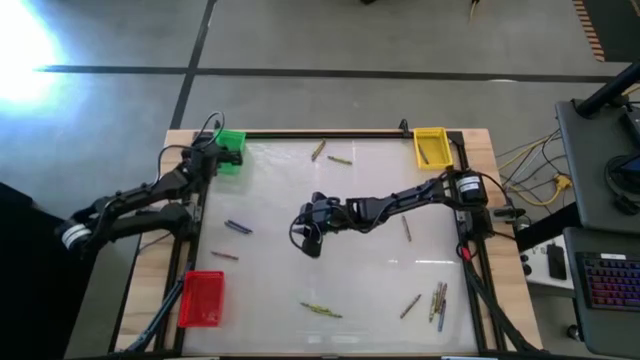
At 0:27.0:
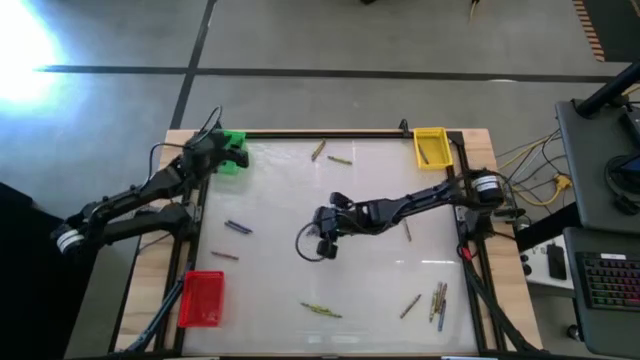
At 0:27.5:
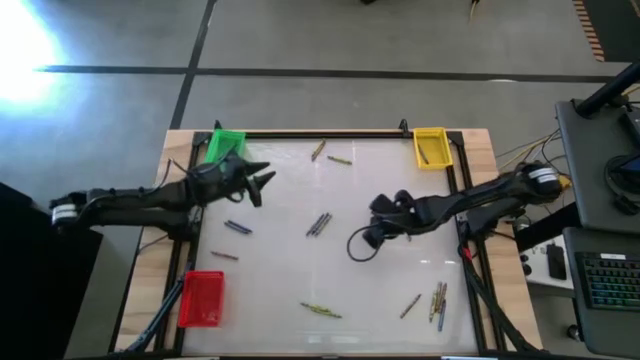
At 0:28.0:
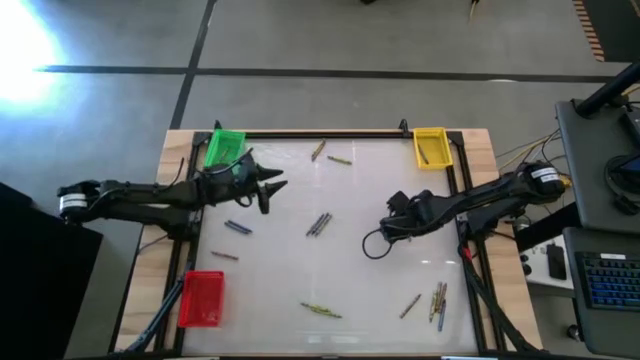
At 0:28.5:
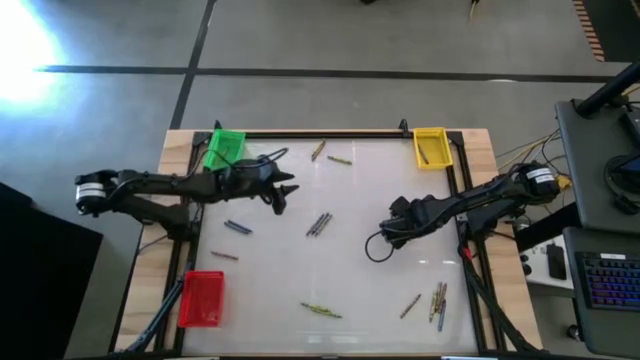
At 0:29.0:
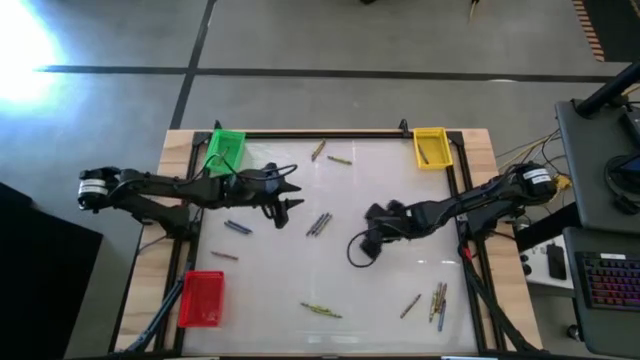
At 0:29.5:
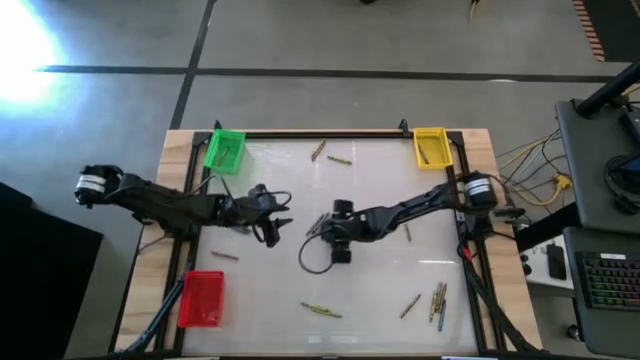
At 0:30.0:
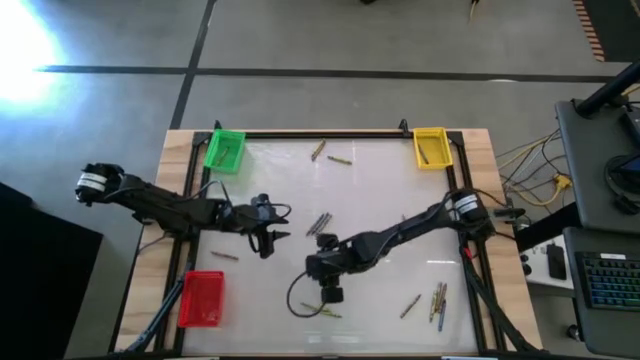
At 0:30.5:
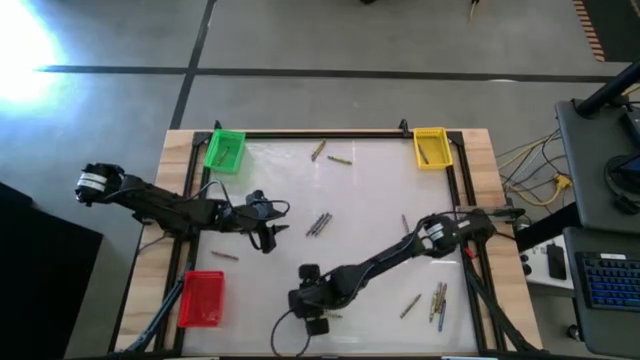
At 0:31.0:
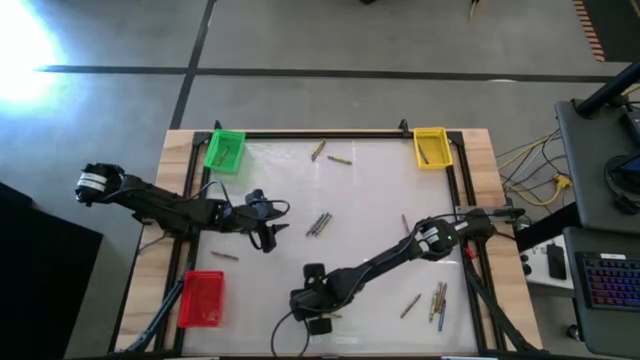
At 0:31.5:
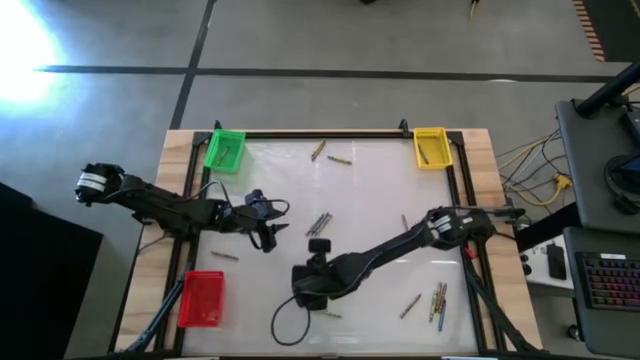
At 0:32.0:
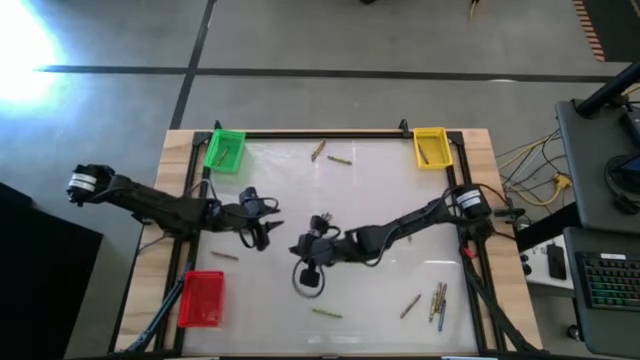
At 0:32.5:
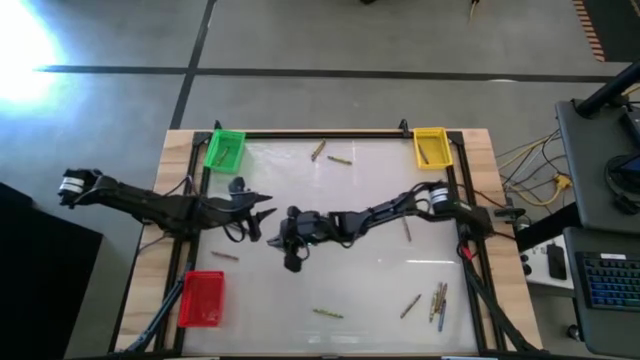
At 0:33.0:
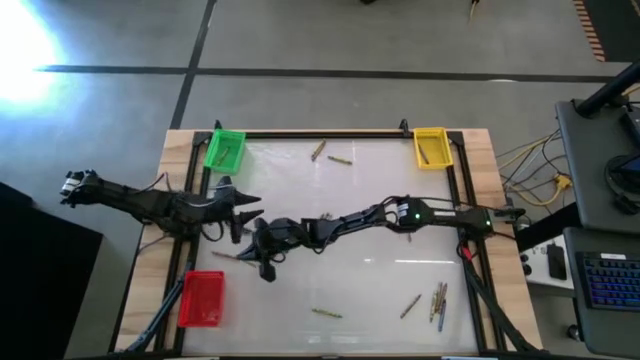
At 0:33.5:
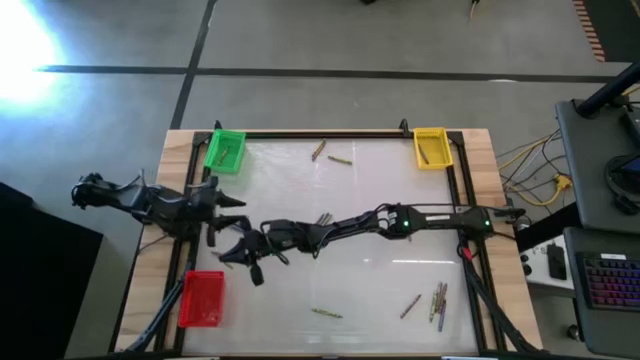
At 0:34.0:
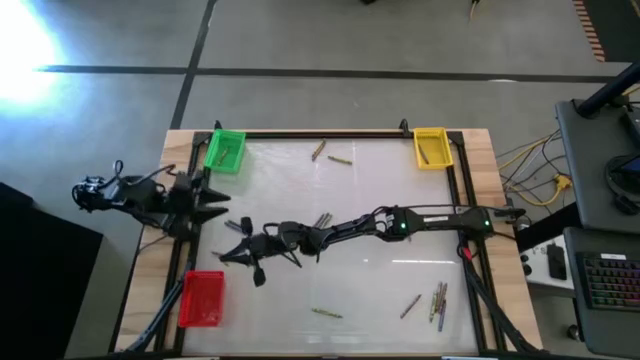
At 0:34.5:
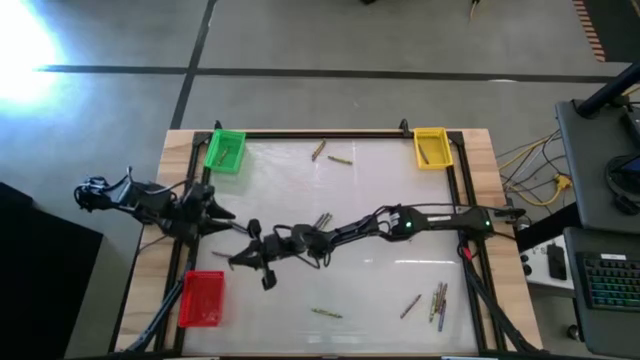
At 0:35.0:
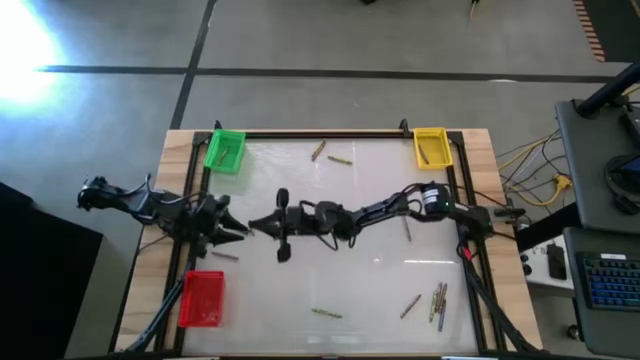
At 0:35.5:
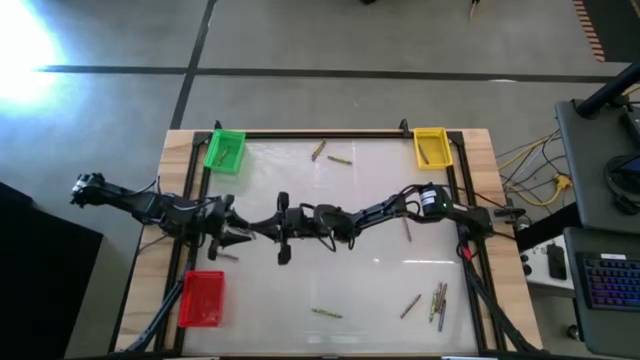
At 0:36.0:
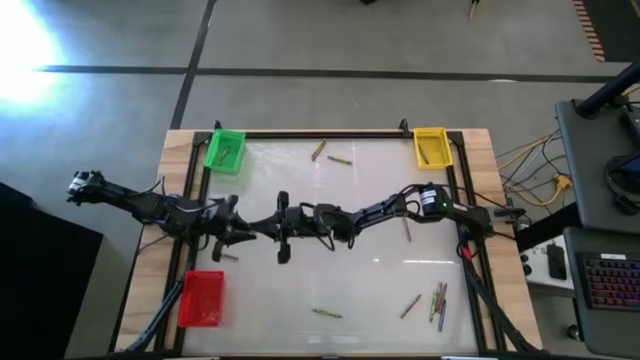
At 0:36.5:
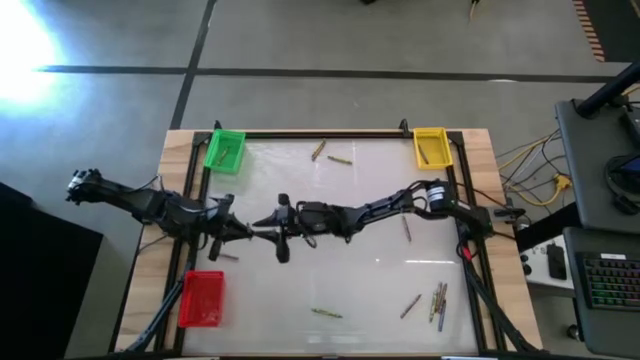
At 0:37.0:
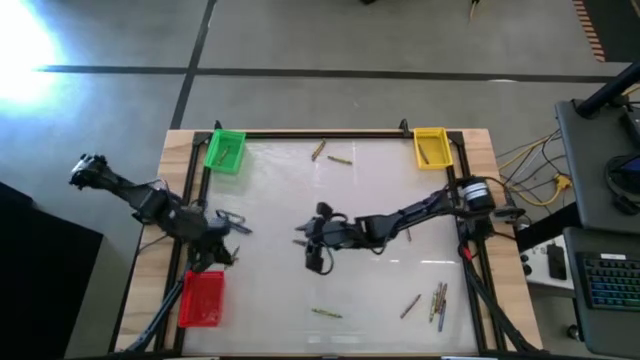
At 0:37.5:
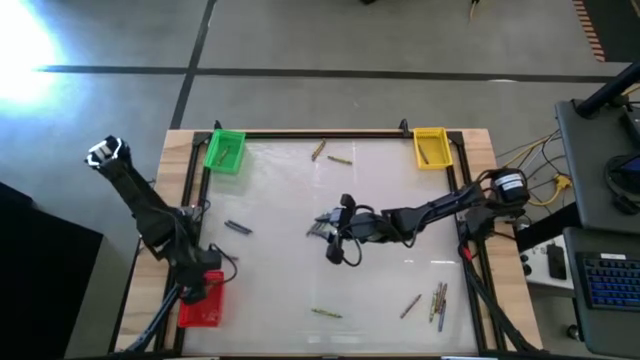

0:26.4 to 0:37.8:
Task: Sort crayons
Put the green crayon into the red basket

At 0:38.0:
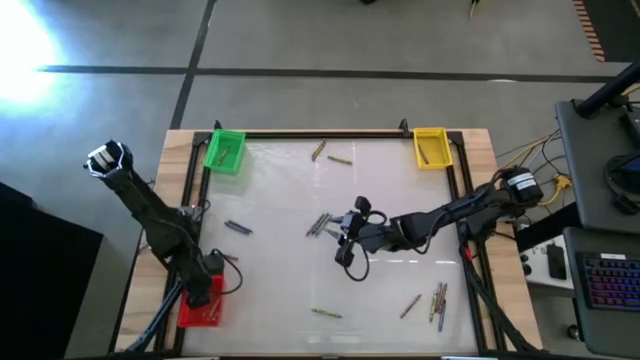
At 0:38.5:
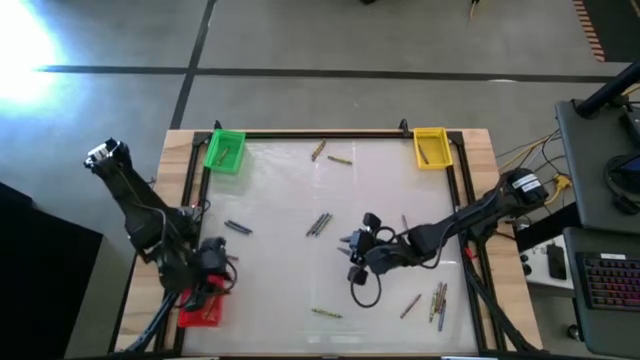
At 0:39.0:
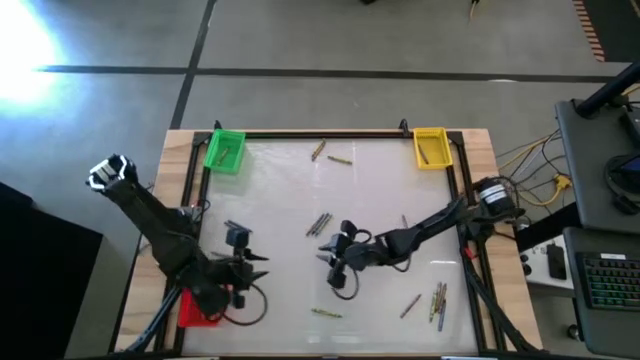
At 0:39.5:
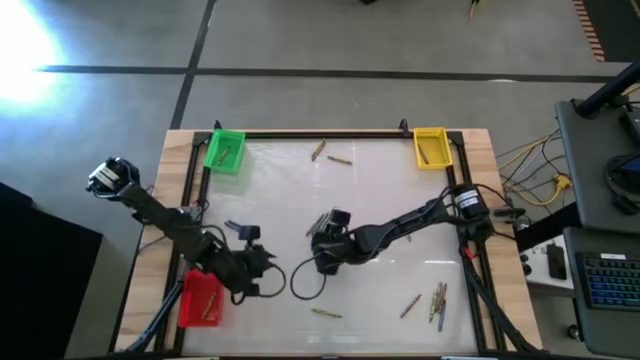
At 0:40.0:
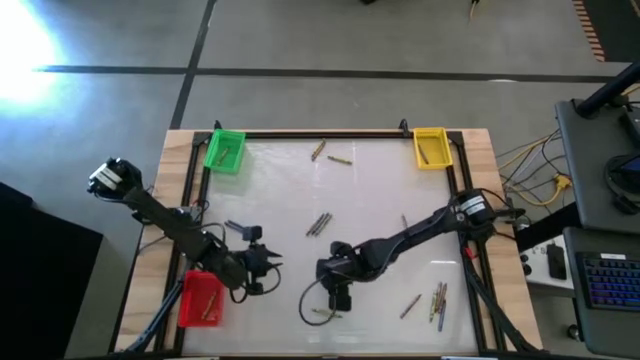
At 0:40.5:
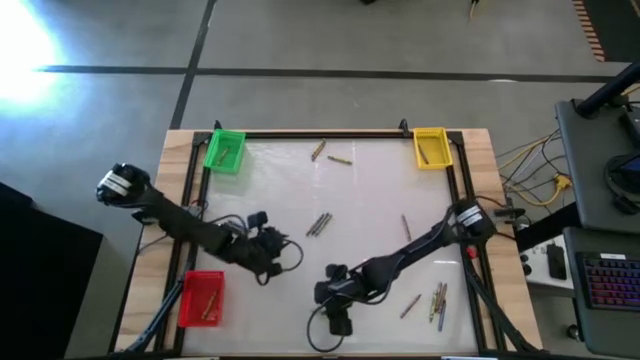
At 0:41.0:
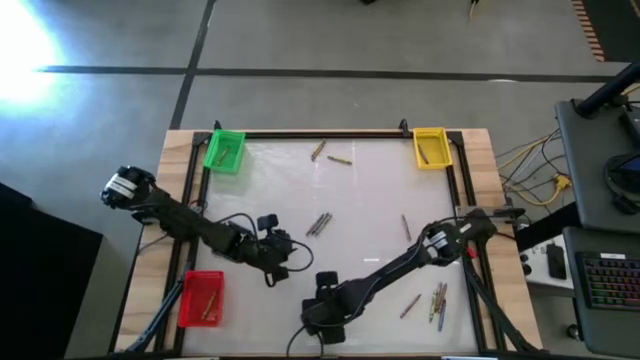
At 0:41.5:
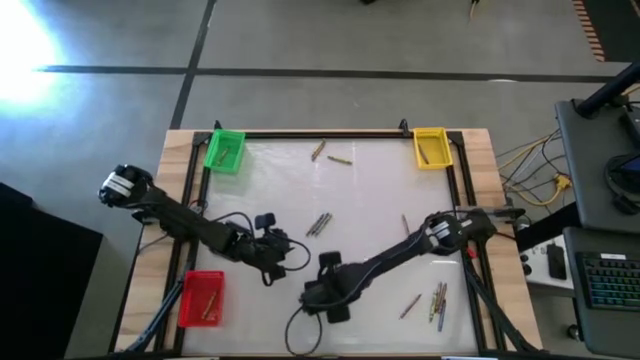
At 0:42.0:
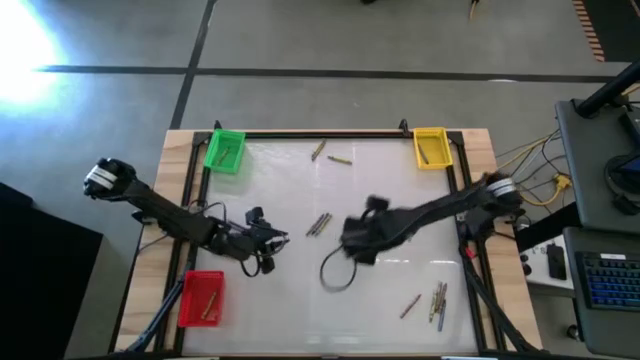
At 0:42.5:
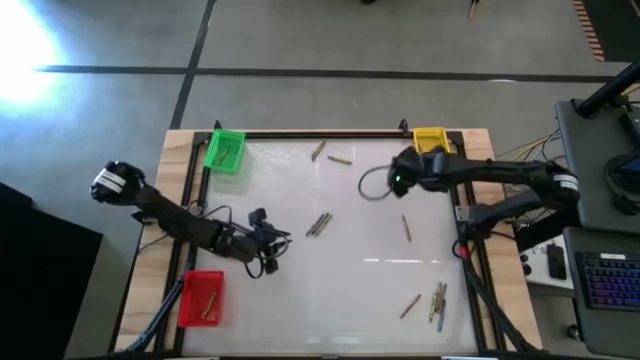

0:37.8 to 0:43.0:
Put the green crayon into the yellow basket
